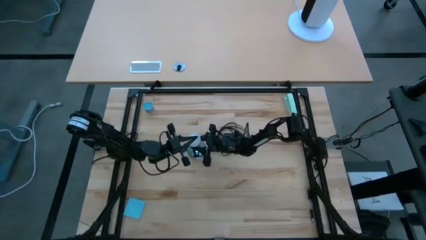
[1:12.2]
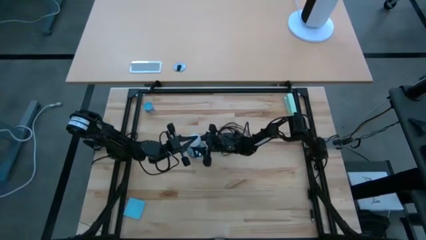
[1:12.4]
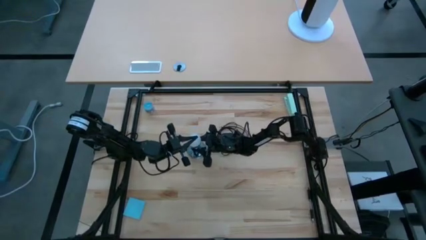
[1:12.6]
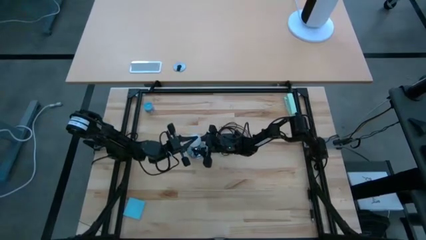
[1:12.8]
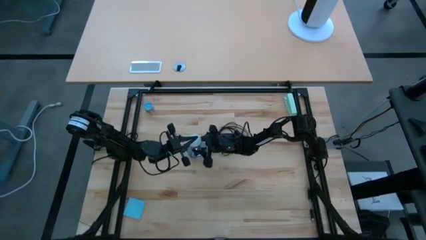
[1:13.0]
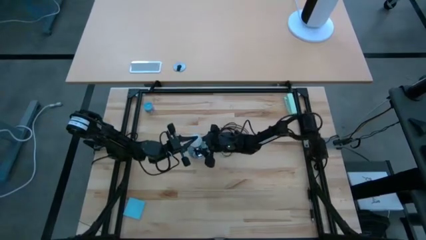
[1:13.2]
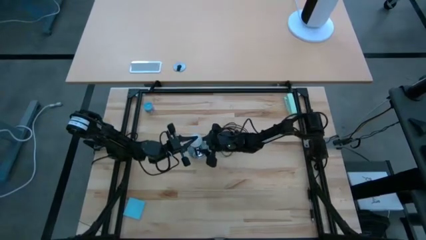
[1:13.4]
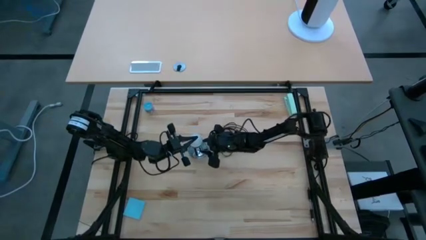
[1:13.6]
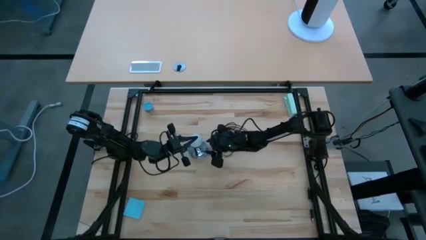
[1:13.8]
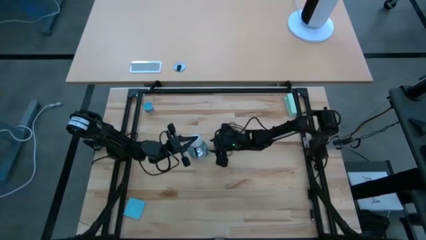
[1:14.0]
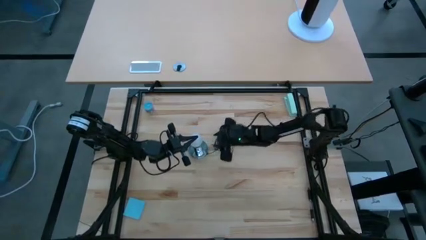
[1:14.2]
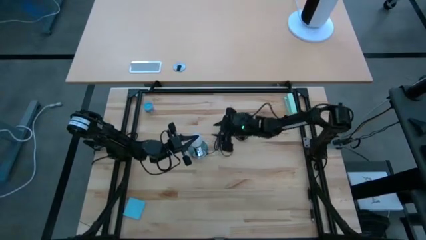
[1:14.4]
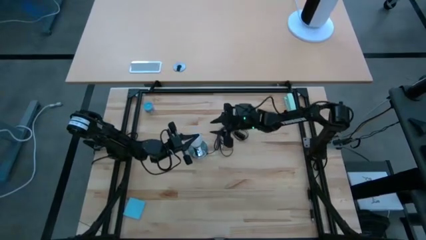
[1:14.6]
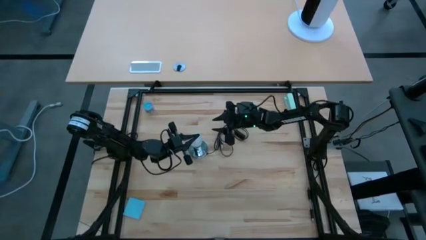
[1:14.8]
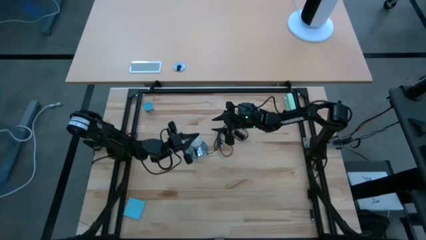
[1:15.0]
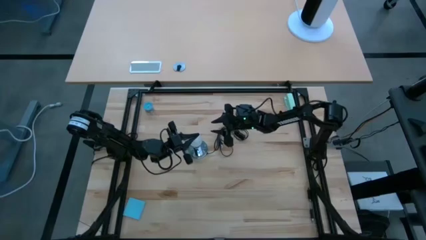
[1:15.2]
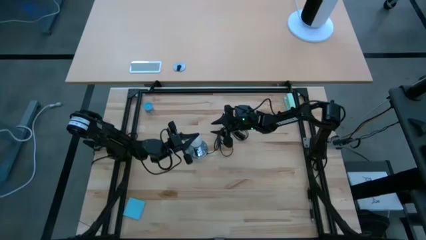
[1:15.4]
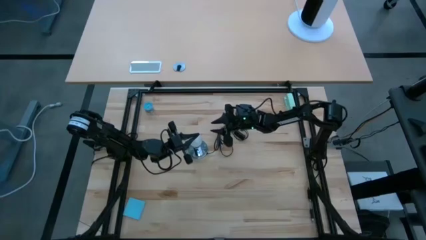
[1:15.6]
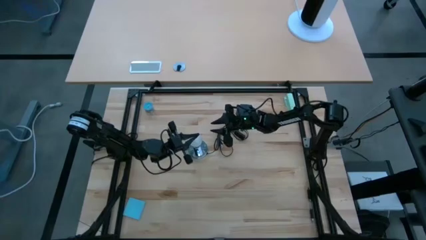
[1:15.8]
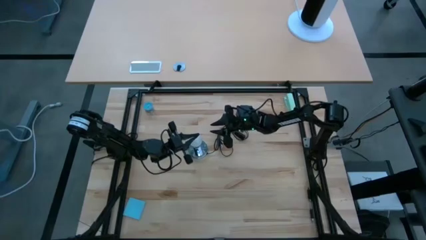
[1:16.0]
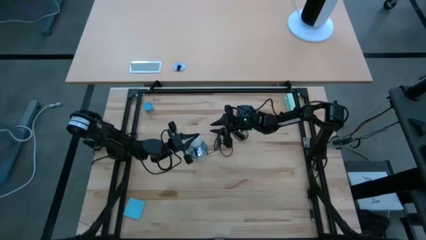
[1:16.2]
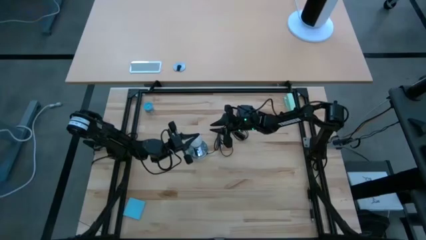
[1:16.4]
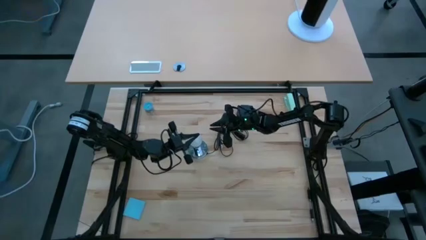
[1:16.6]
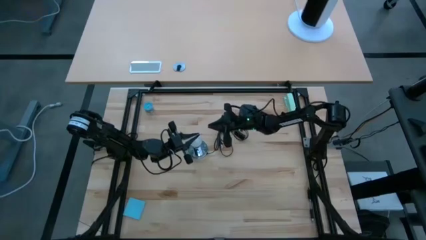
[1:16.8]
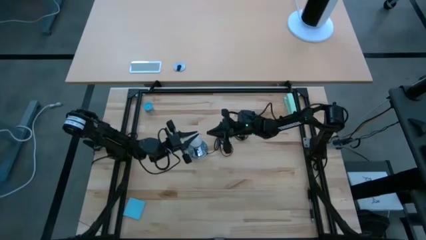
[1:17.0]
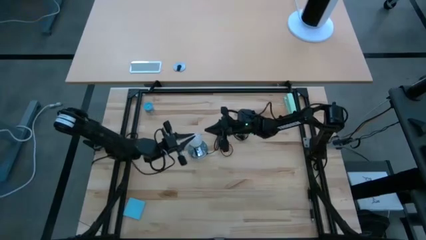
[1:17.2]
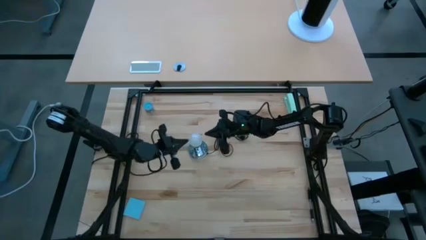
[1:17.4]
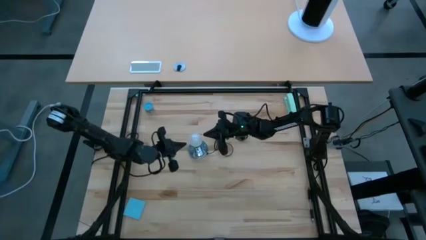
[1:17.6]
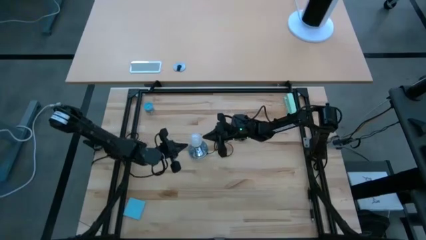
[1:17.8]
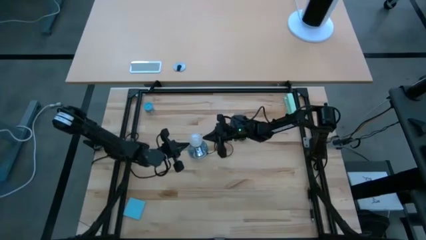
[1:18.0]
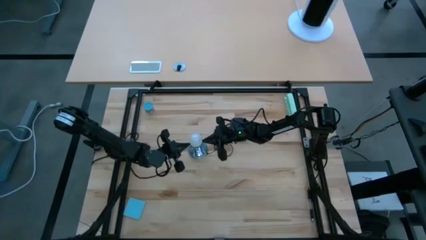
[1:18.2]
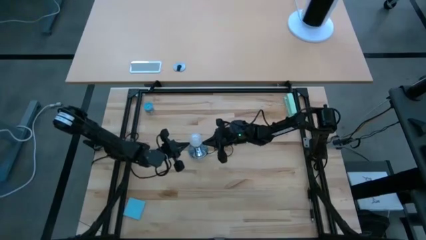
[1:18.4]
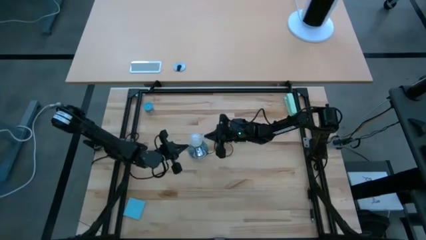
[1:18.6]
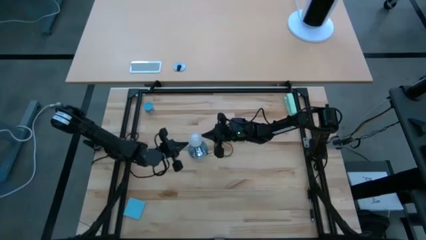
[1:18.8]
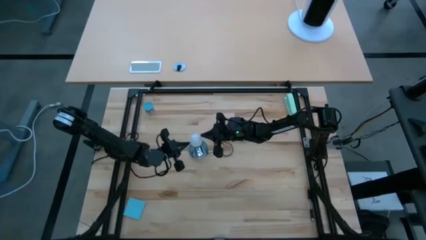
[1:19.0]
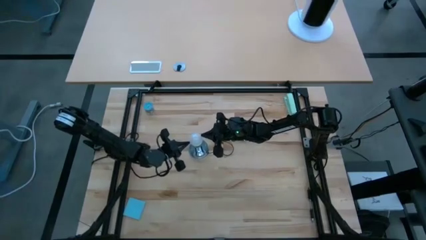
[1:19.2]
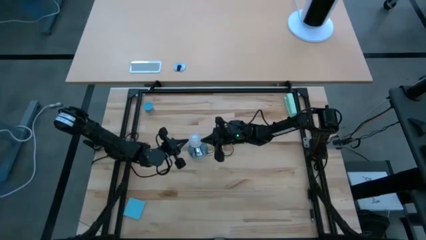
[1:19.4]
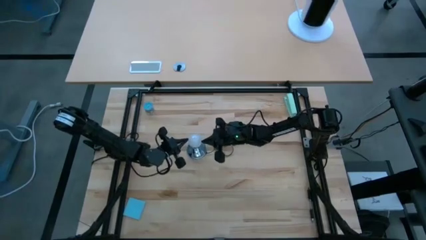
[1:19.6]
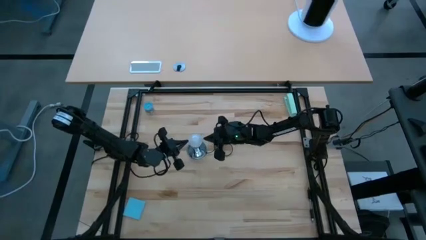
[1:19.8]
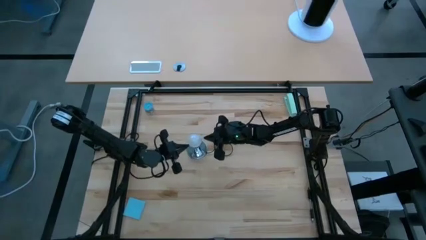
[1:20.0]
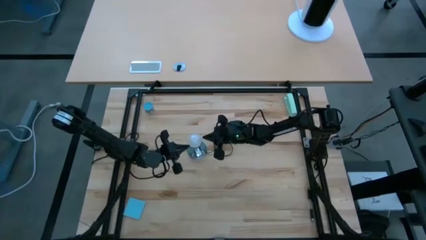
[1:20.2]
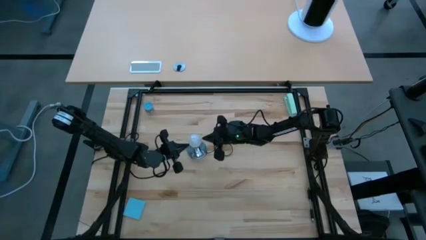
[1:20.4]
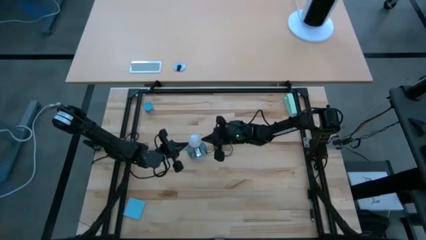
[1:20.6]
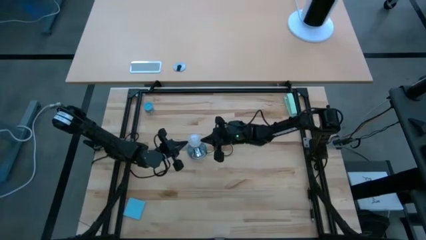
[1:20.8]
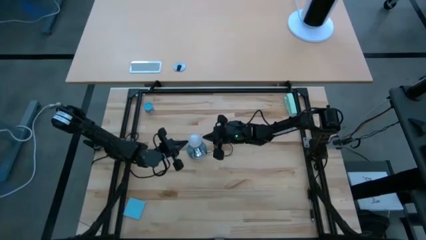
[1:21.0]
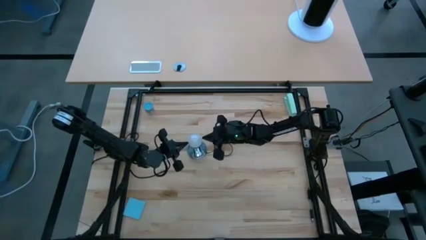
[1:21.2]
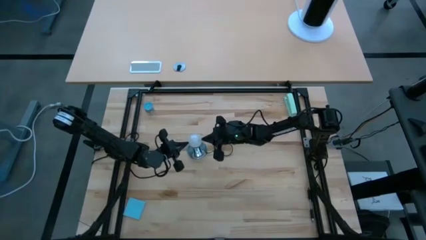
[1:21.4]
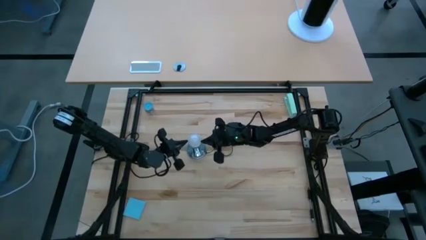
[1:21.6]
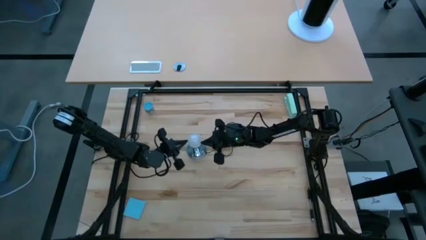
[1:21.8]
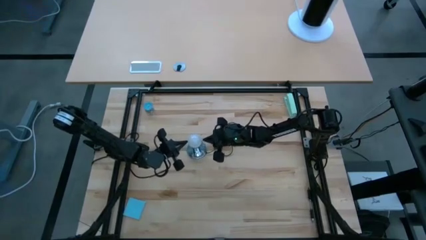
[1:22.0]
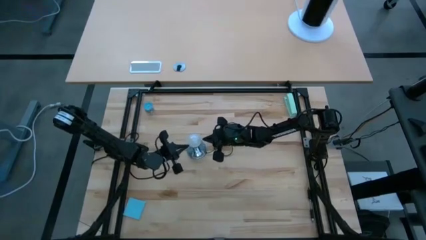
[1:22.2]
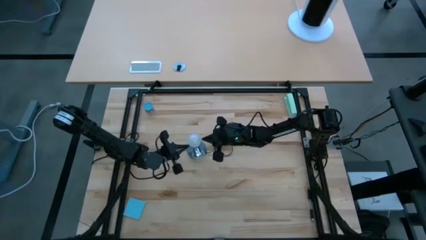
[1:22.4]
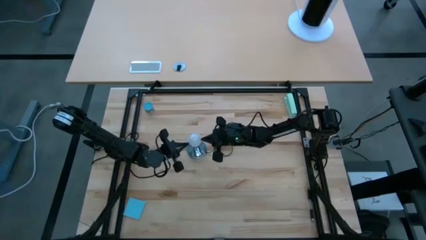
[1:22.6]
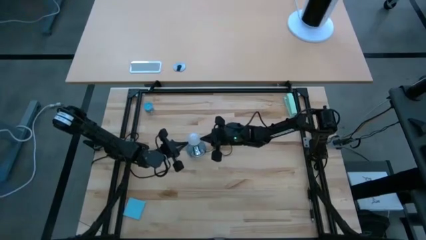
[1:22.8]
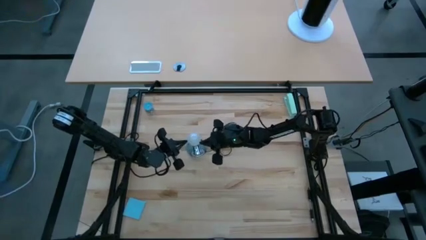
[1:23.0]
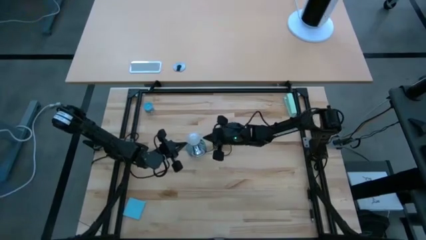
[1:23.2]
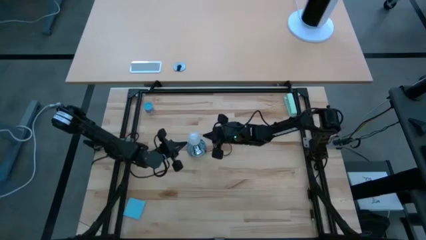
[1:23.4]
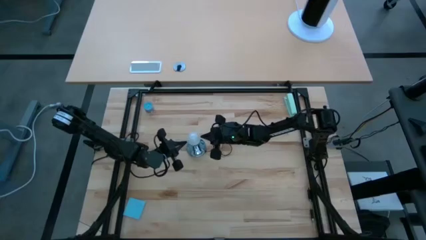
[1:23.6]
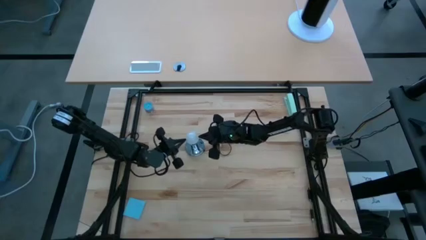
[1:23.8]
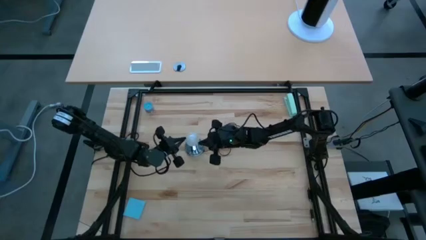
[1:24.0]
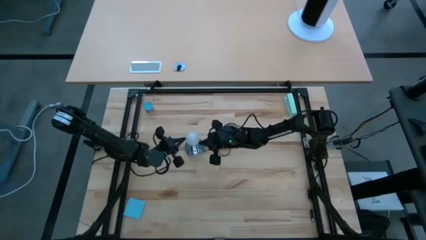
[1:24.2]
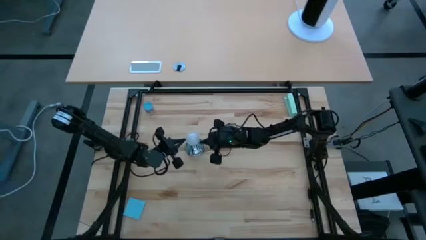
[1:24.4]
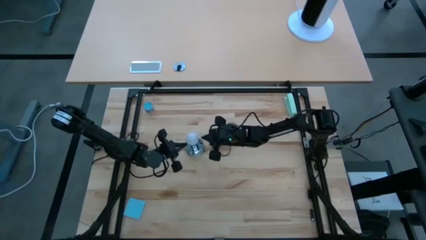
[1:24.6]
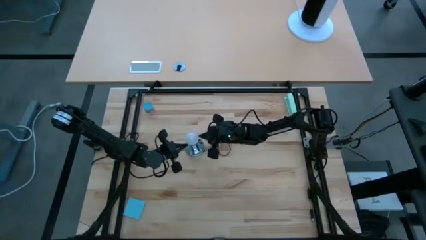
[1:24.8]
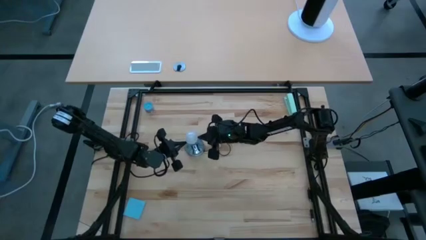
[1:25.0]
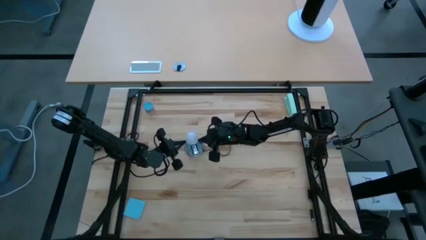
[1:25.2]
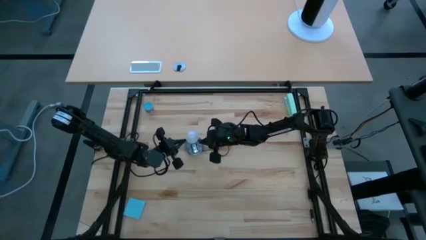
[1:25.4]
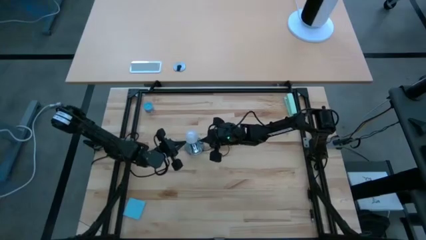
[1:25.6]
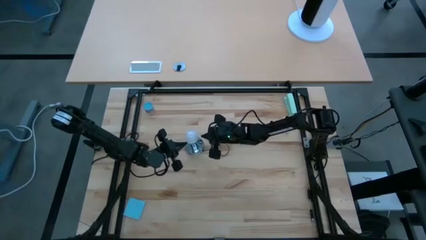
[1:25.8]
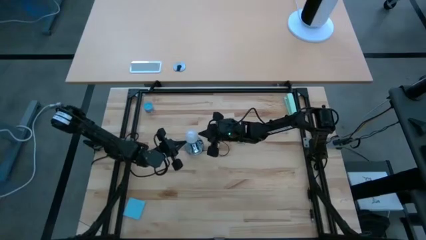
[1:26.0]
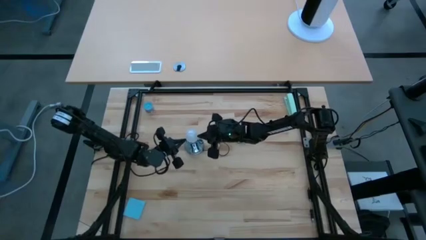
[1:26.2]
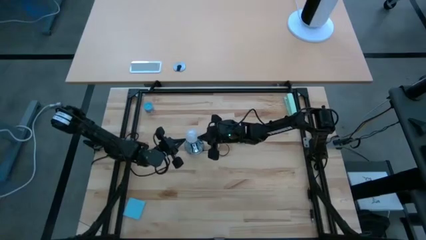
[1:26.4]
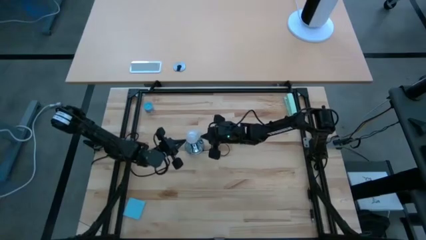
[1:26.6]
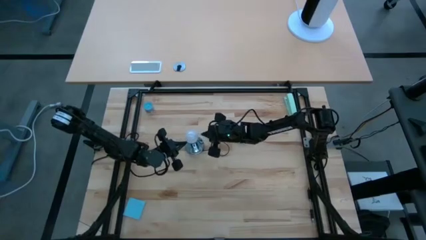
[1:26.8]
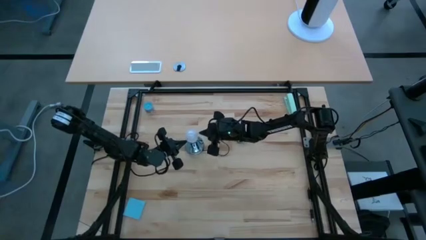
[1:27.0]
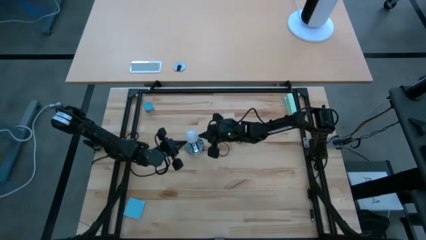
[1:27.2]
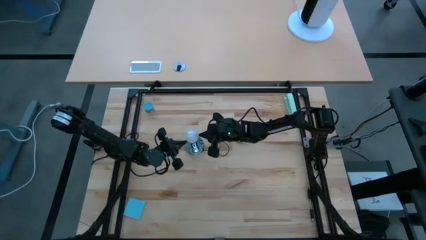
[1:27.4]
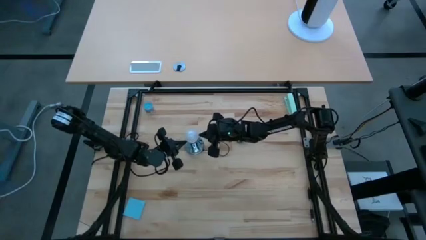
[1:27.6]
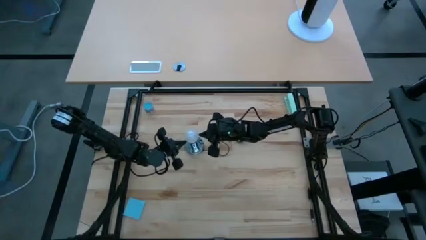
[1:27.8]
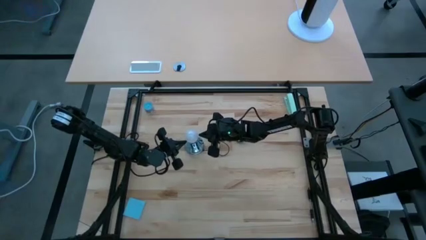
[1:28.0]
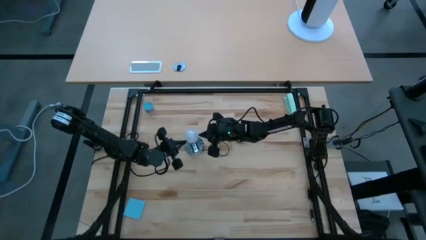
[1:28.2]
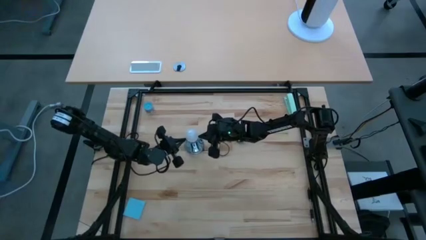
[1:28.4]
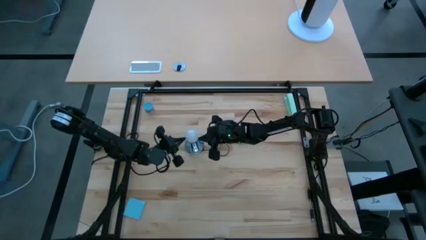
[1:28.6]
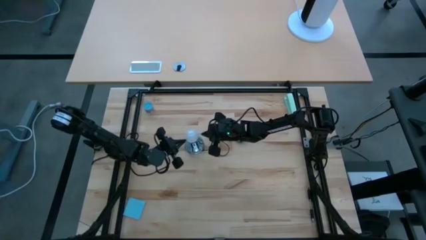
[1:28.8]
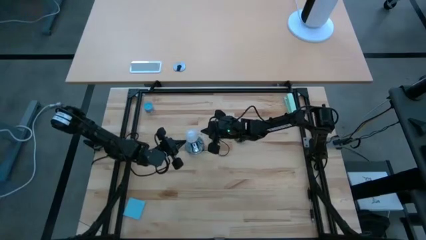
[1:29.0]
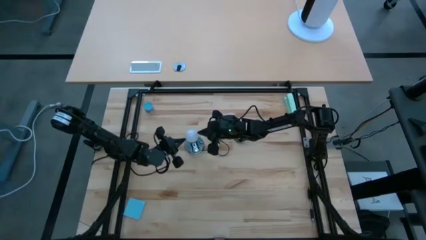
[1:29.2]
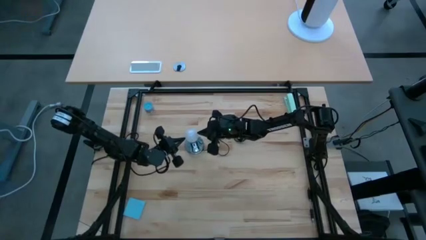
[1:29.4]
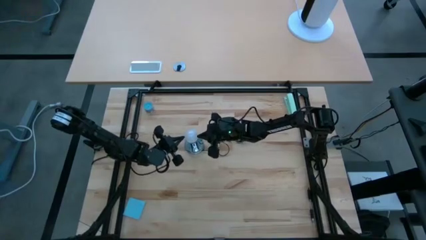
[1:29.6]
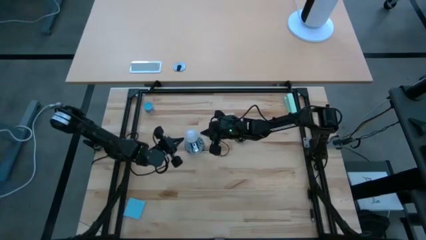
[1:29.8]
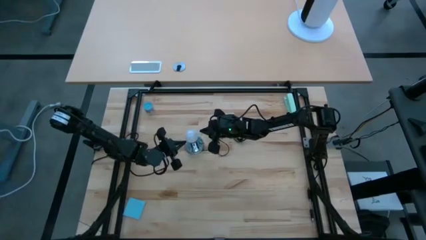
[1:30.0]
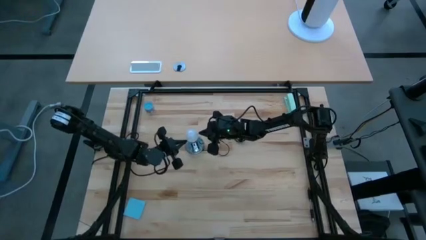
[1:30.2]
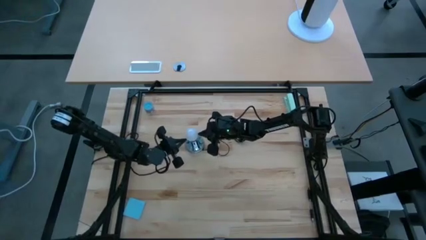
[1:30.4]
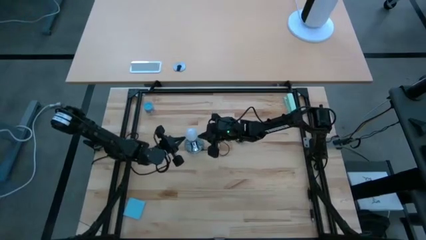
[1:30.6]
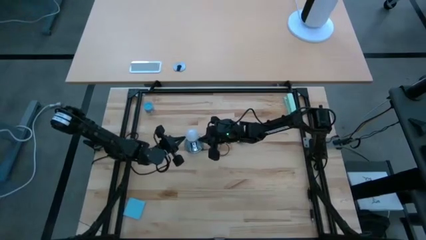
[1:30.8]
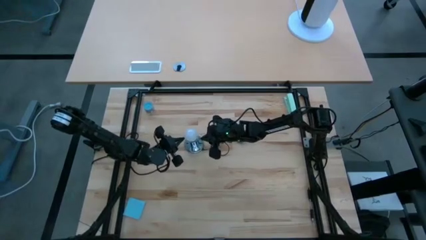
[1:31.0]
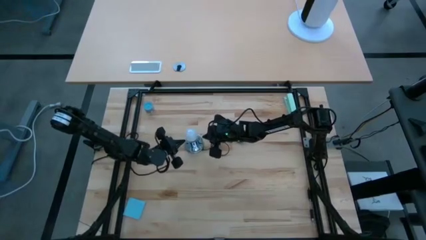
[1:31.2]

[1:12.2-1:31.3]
Task: Screw lightbulb
Insert the lightbulb into the lamp
